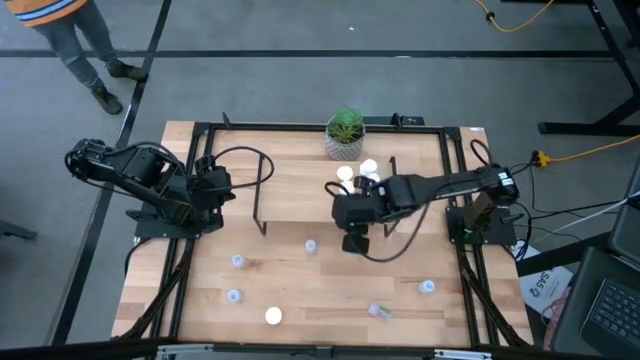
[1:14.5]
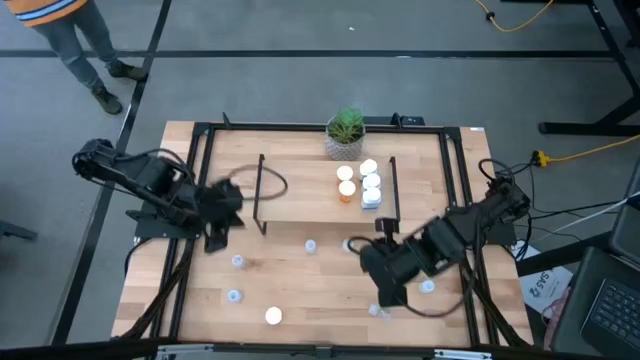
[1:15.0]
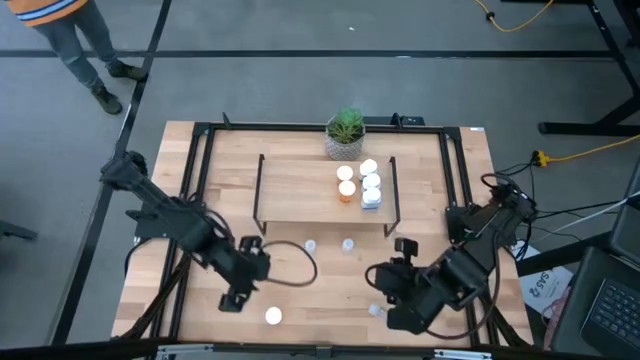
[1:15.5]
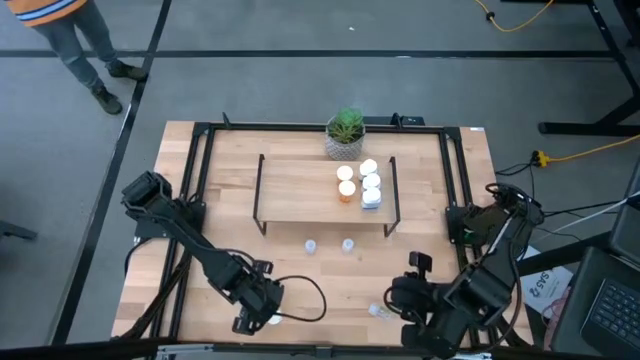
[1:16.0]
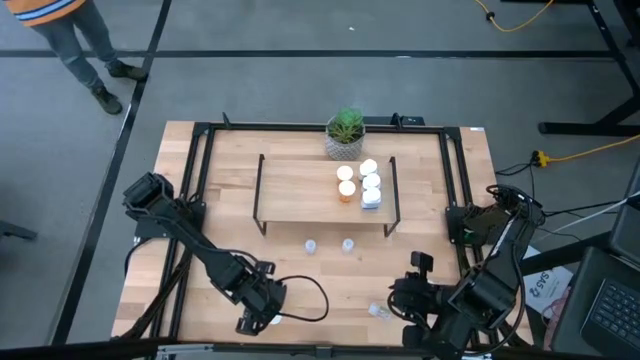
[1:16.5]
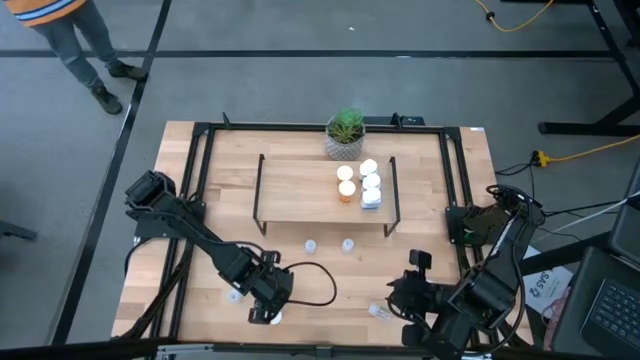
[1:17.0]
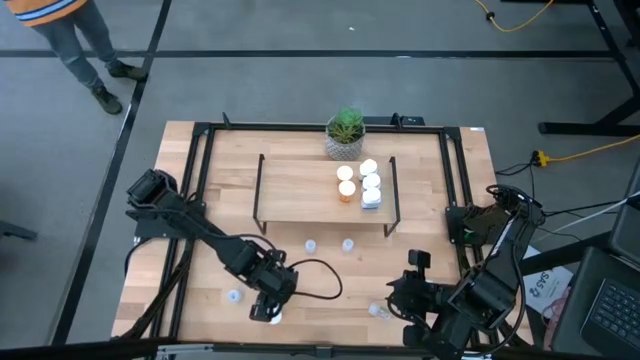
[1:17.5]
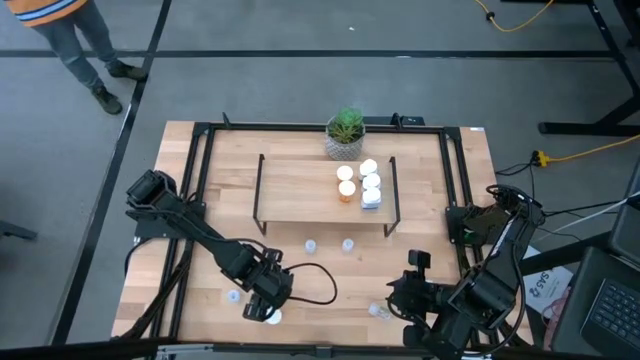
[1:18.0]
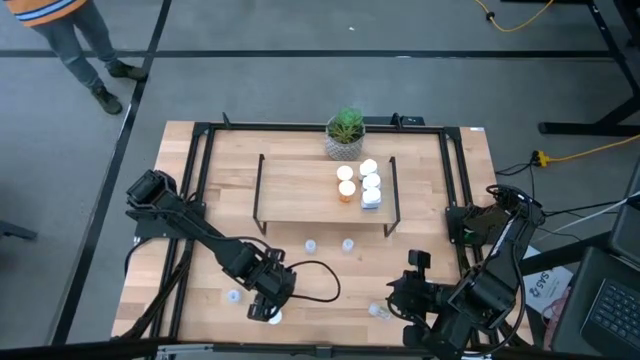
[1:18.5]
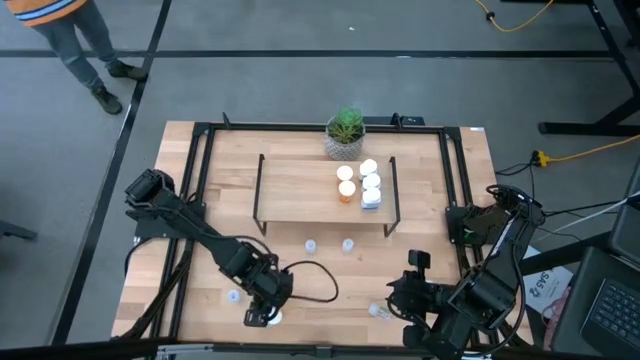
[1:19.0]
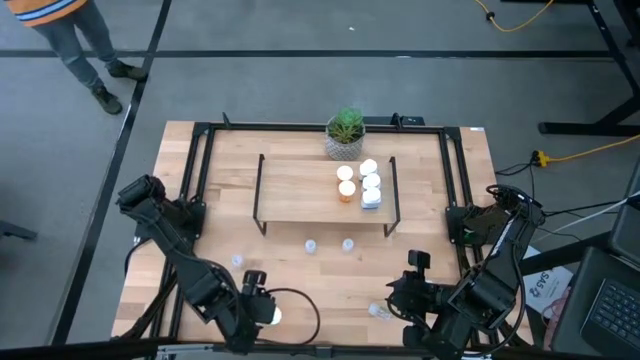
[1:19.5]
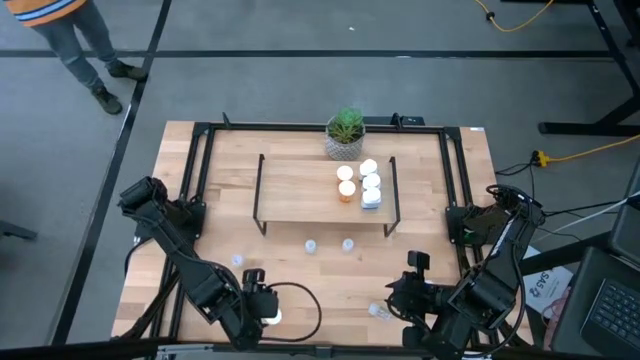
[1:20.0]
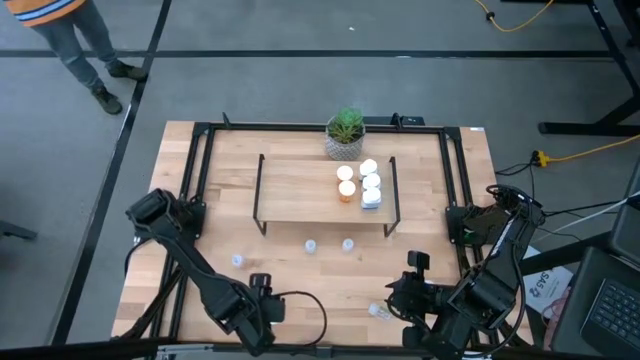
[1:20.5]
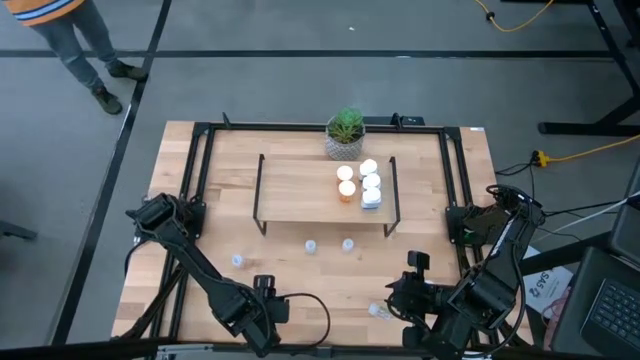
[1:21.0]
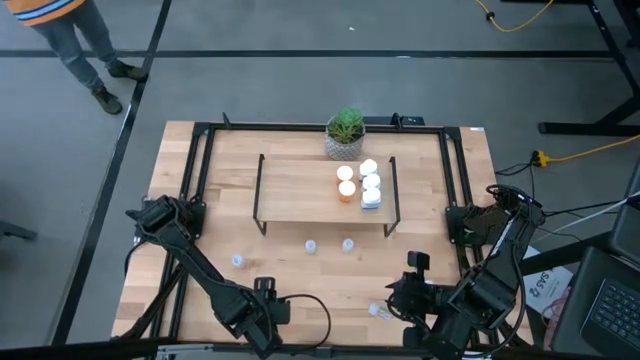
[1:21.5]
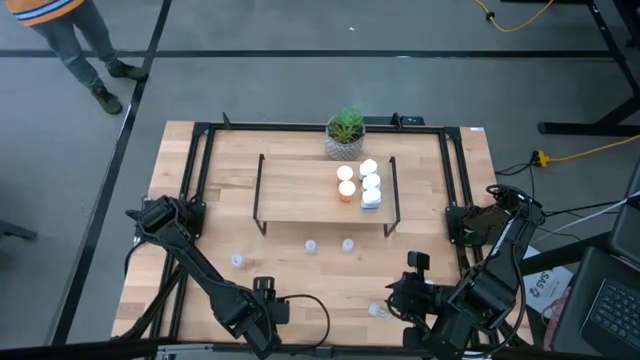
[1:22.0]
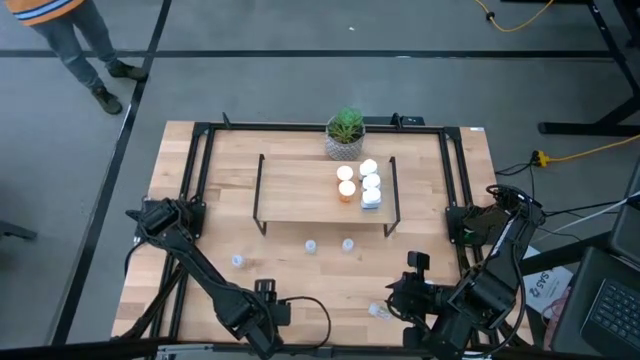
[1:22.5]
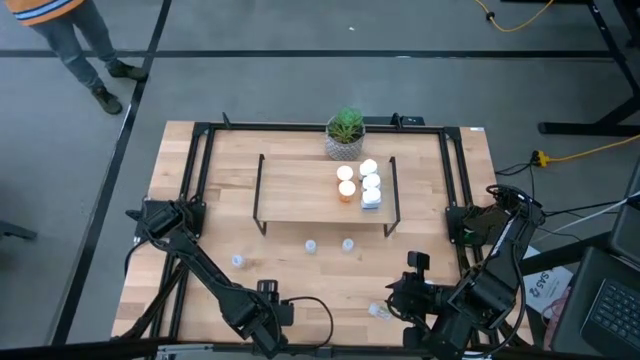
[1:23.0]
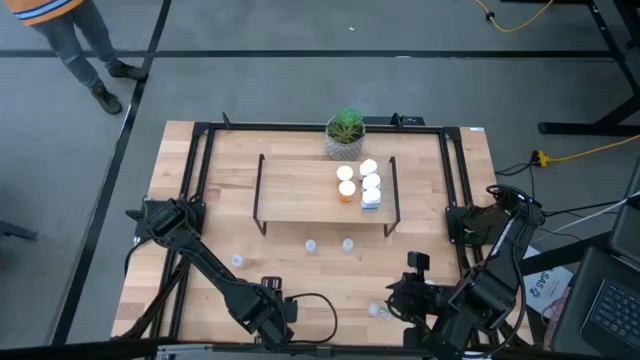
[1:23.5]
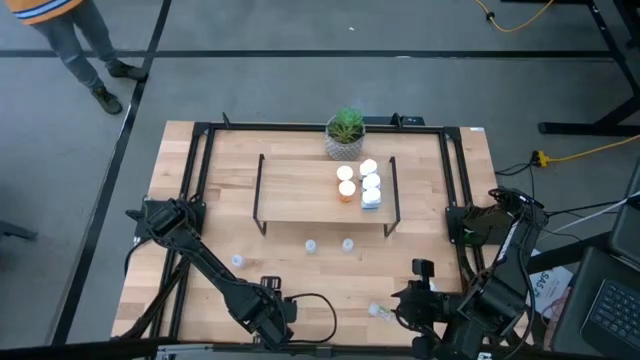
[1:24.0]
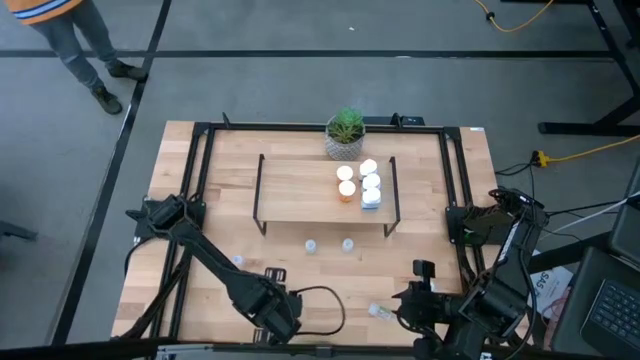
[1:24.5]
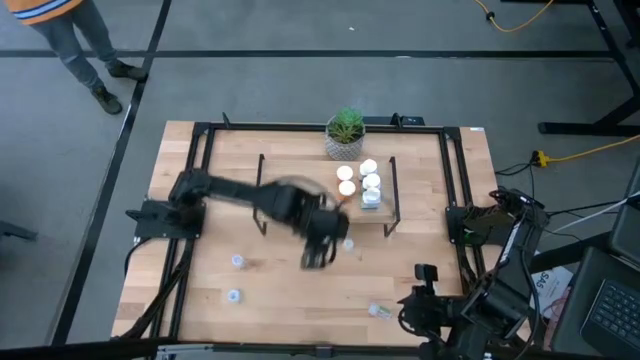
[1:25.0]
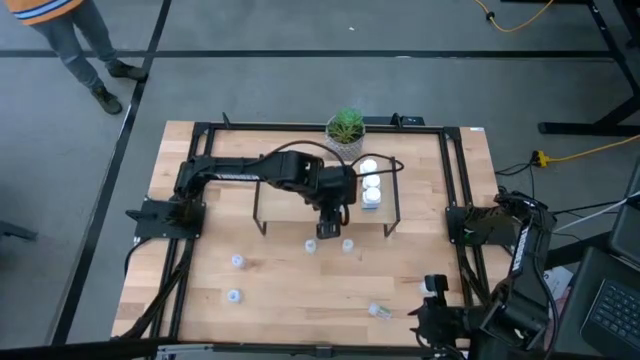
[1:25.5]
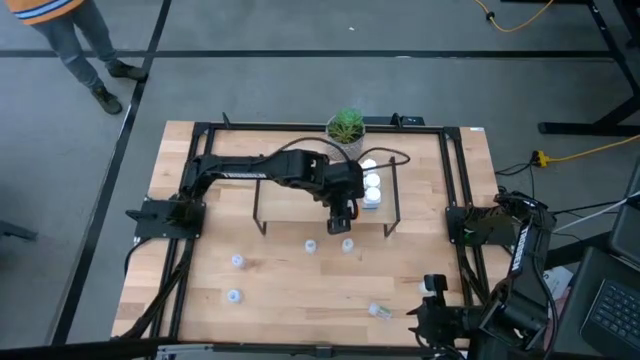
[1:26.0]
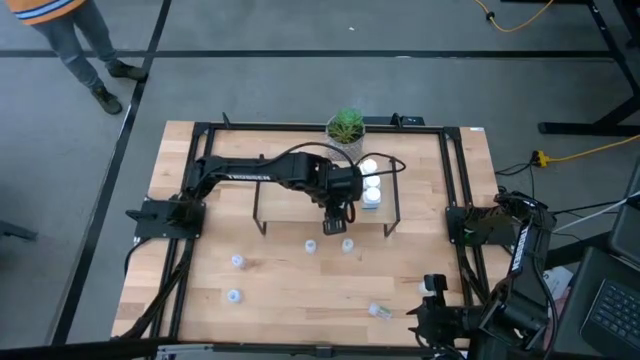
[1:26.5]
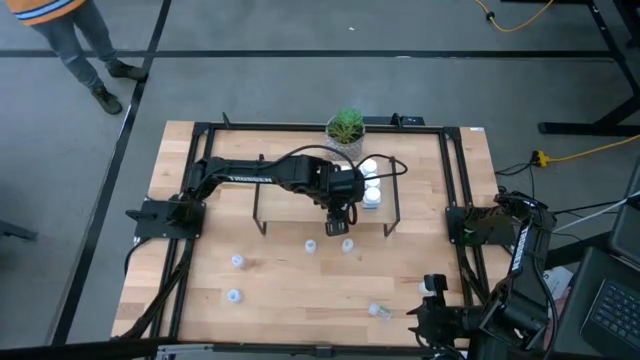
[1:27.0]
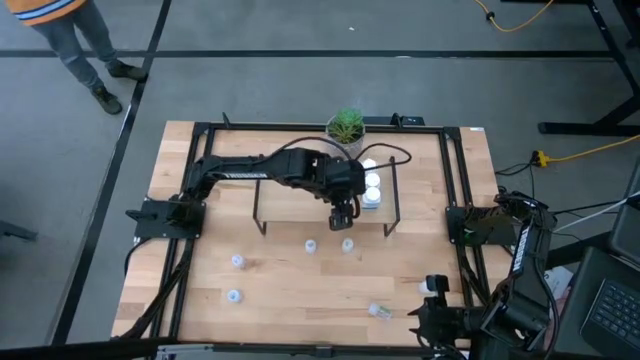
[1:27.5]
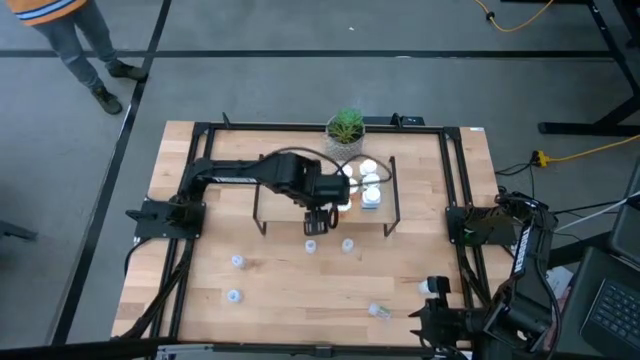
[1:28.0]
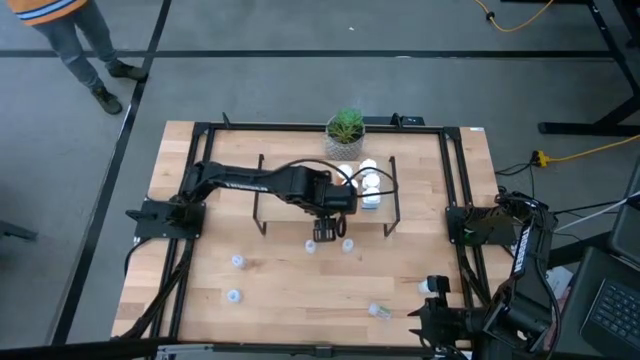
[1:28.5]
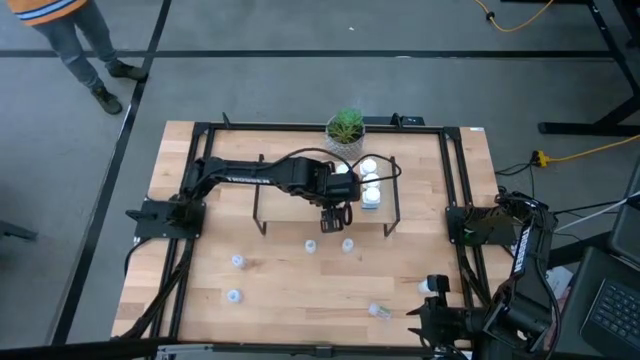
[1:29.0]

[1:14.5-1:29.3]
Task: Pick and place medicine bottles onto shelf by color
Put the orange pill bottle on the shelf aligned with the other orange pill bottle

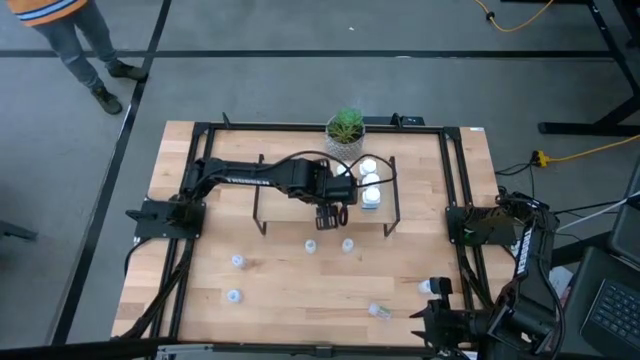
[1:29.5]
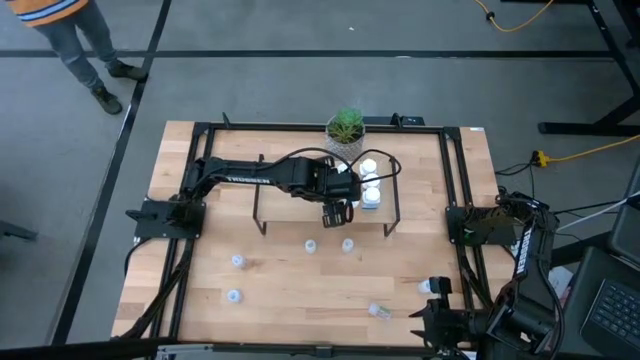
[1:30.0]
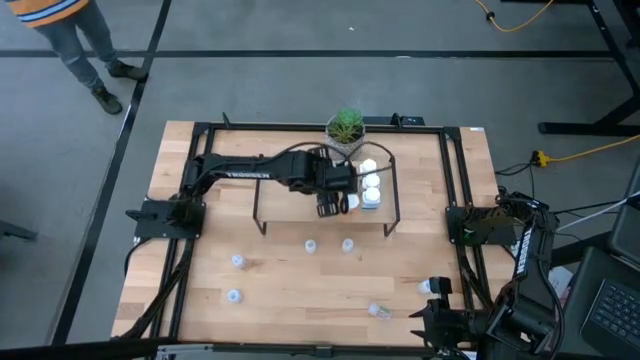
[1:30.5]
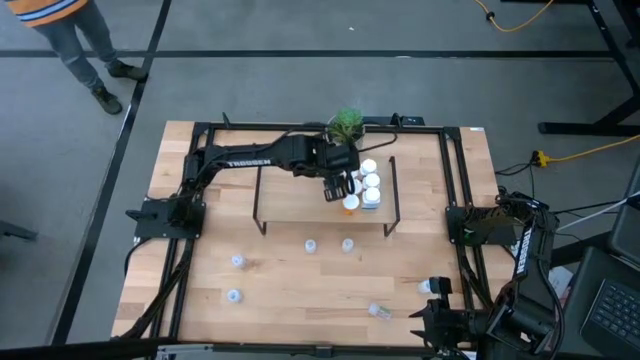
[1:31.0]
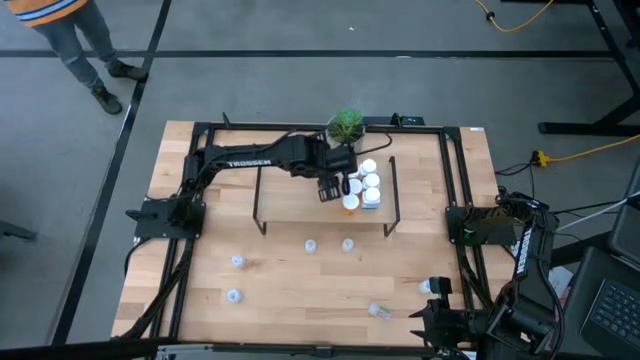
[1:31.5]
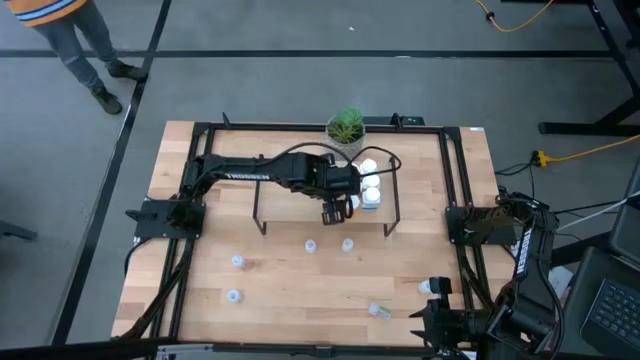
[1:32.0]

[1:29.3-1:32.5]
Adjust the orange pill bottles on the shelf

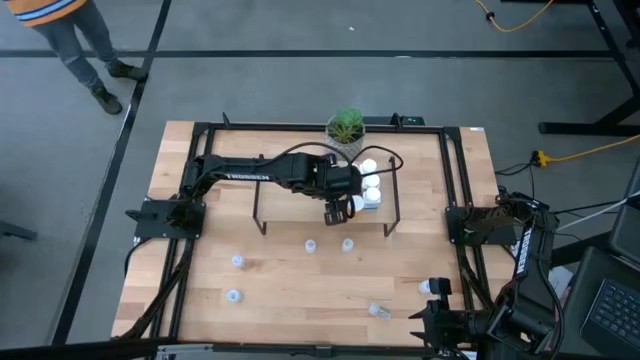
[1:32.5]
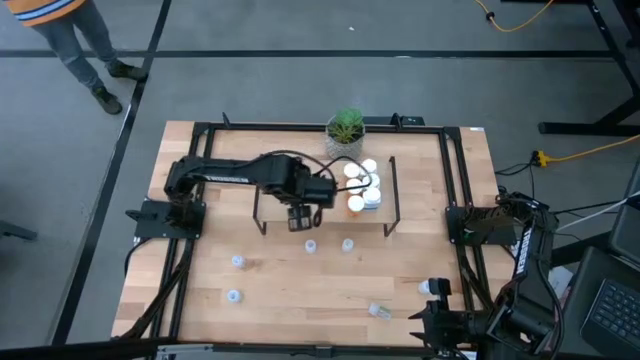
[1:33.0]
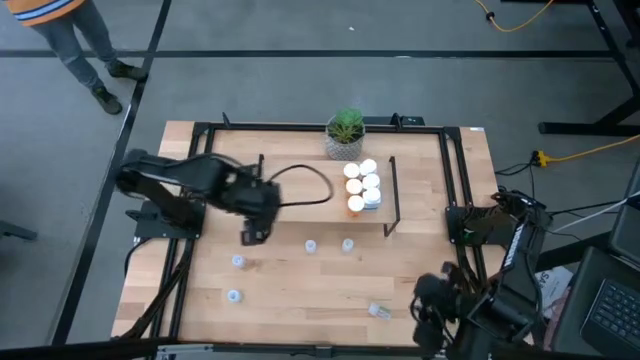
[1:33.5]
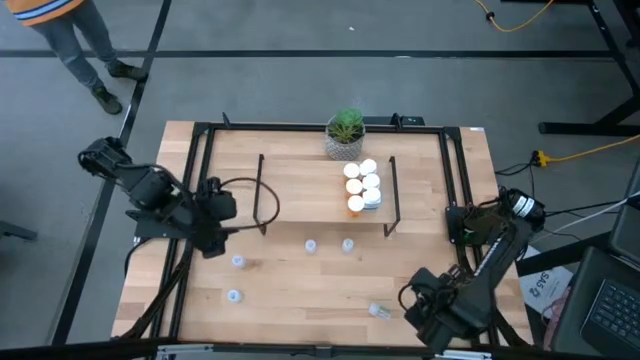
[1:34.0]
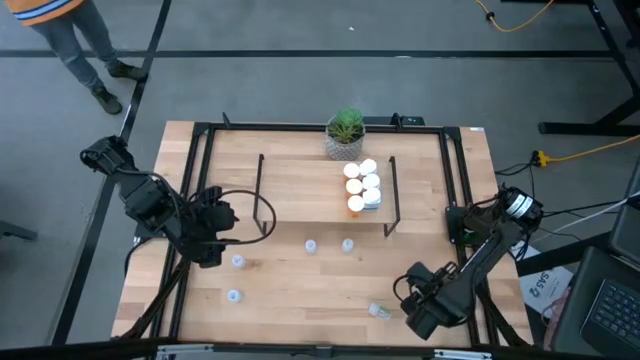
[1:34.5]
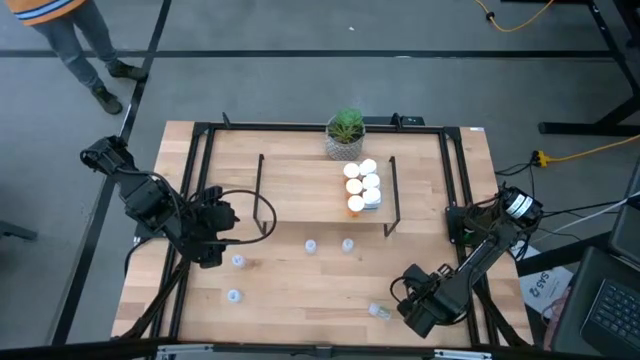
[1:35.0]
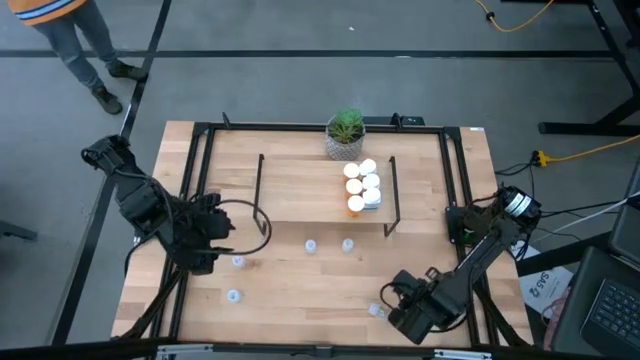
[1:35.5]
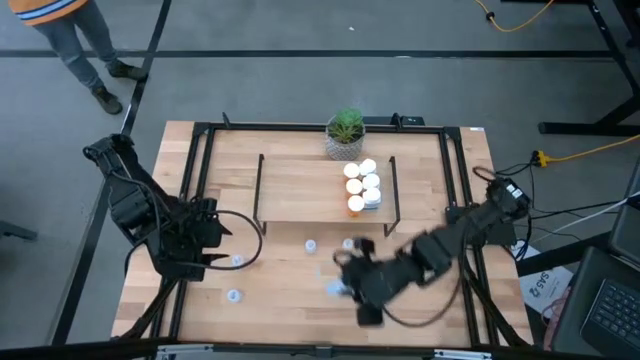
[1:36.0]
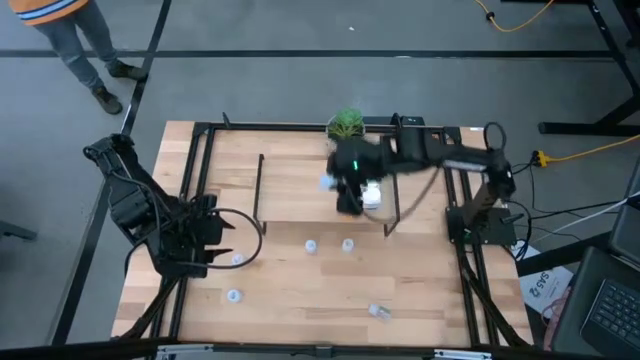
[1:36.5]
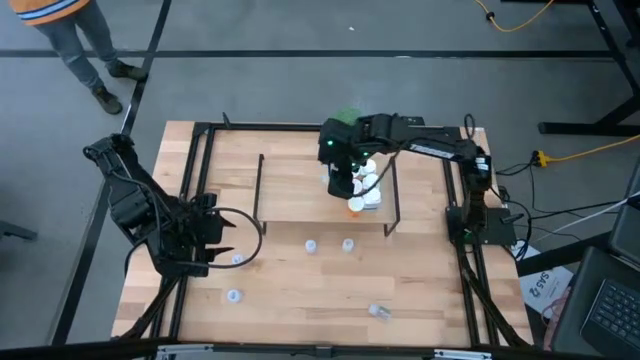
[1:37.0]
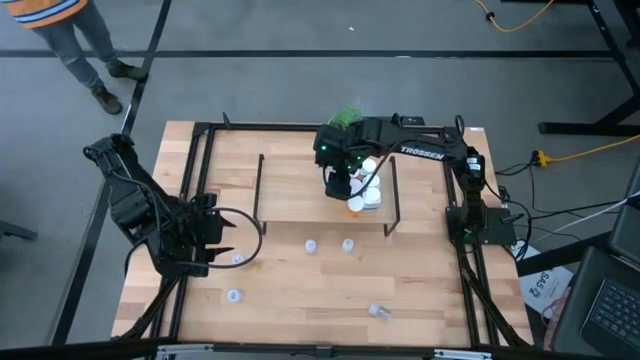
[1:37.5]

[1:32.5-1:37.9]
Put the bottom right white pill bottle on the shelf
